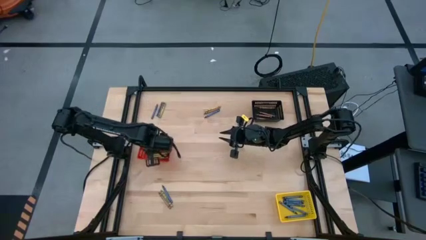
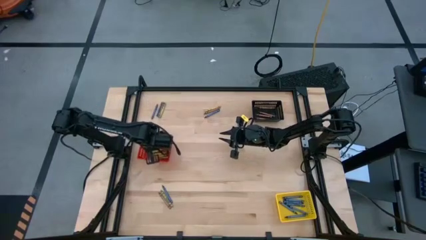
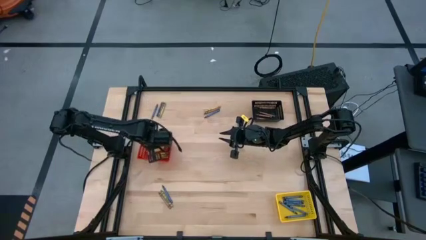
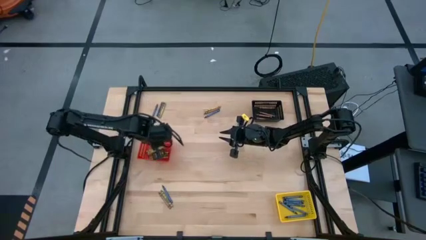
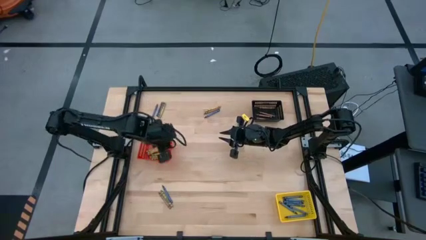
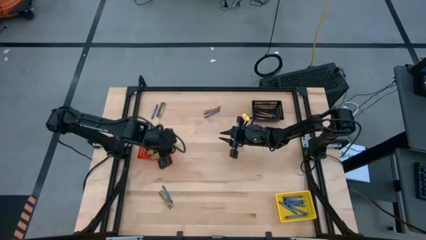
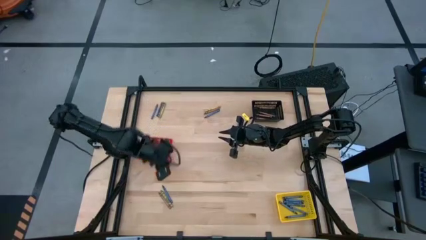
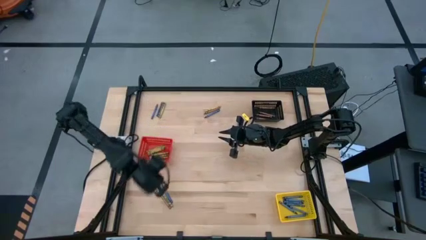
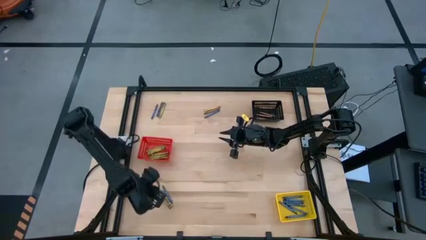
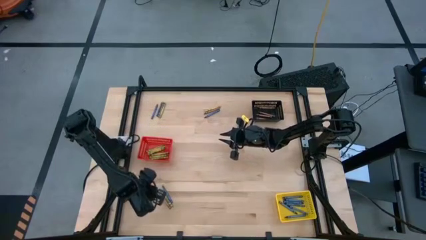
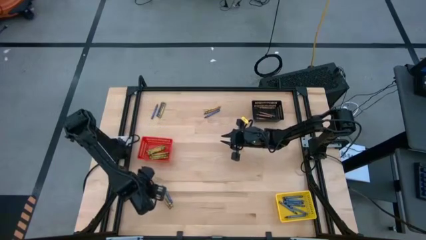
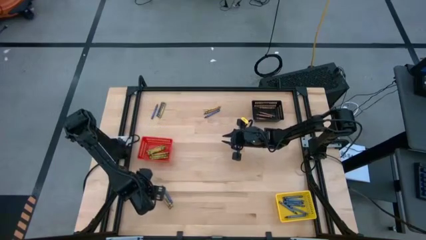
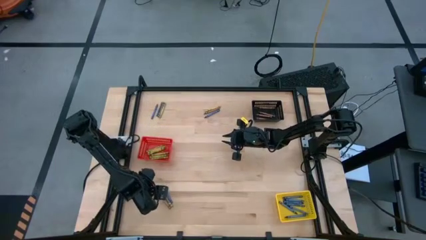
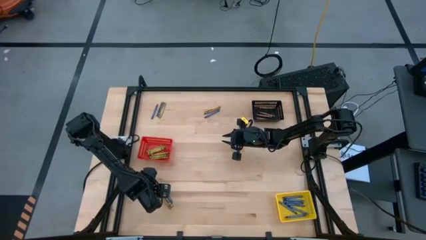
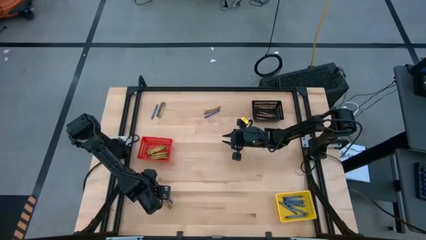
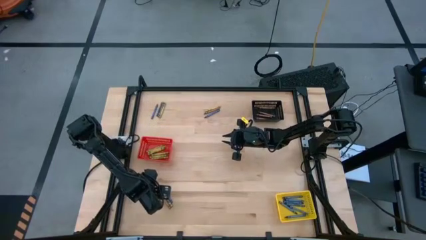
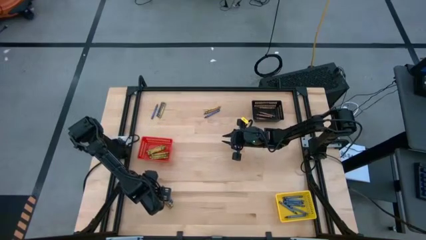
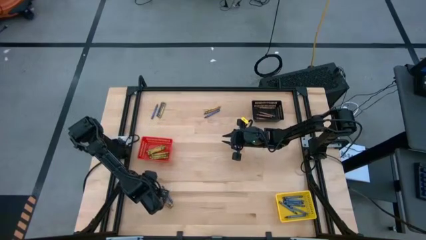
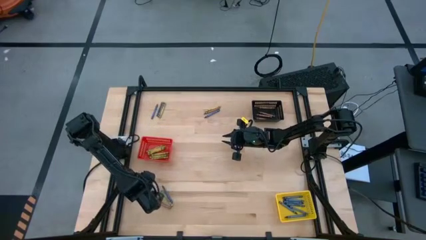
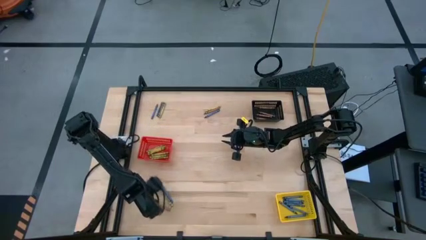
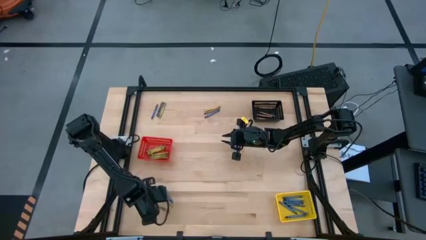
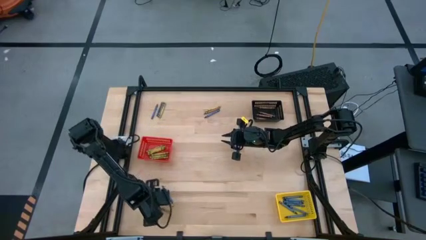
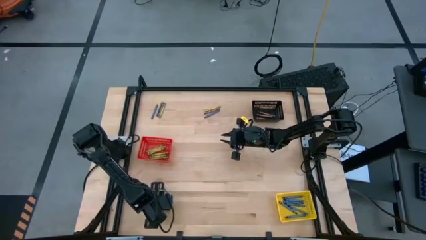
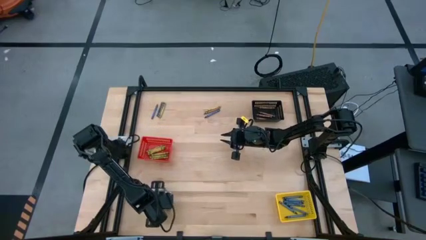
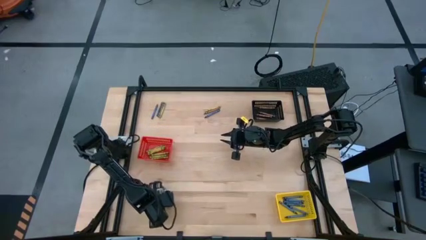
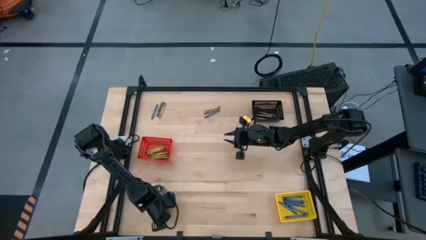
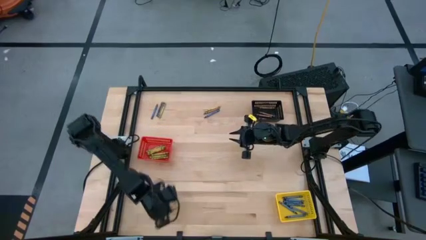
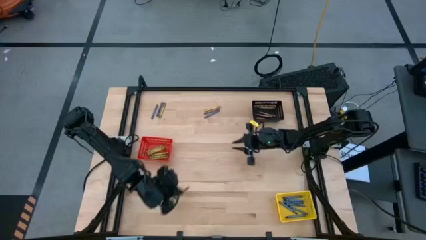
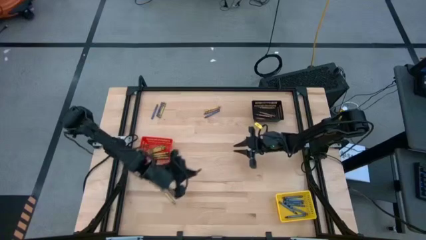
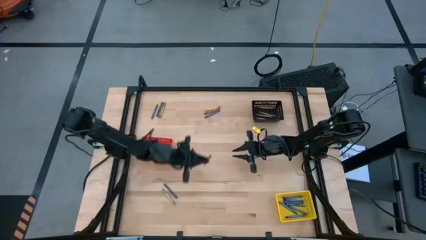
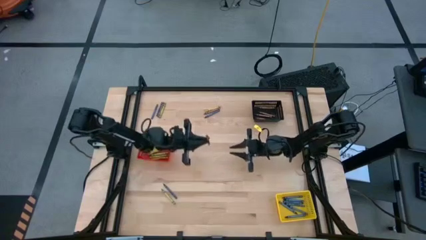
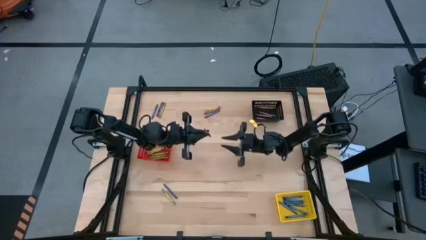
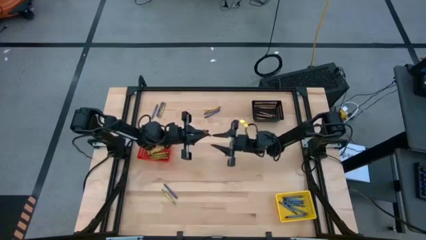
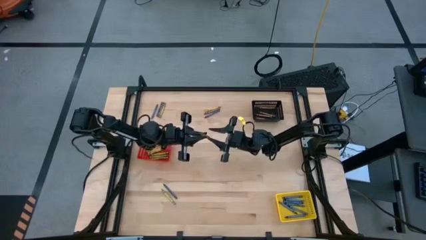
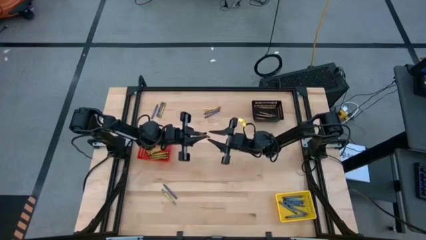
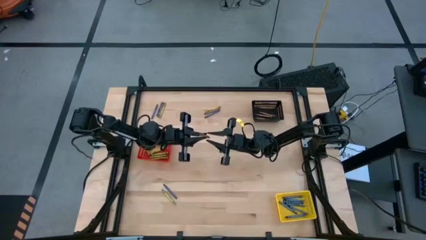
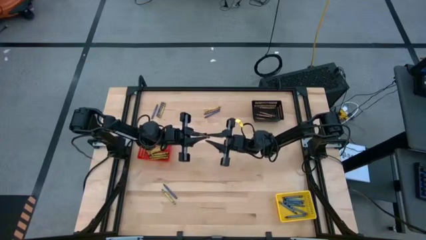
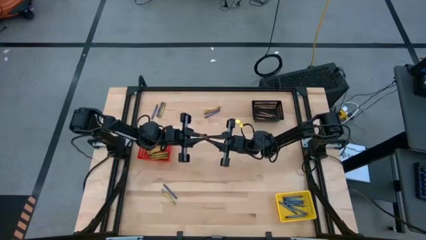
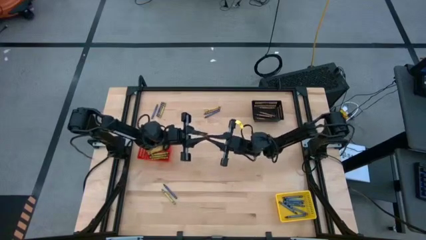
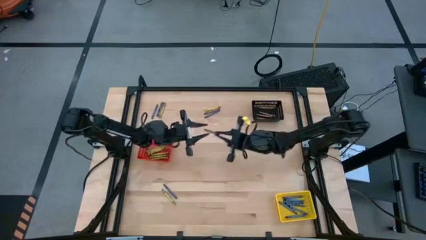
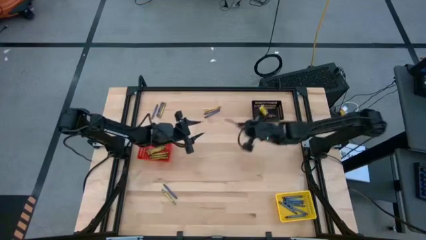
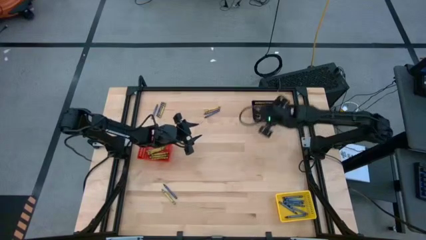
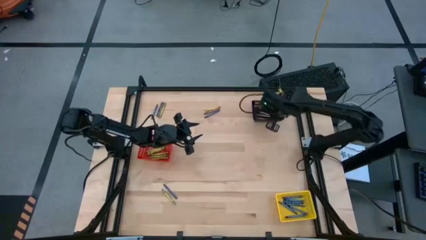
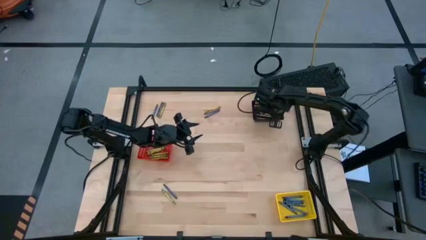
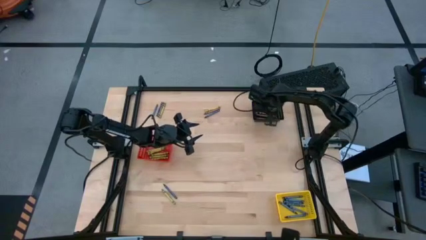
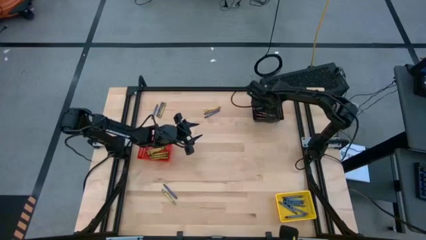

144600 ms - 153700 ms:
Task: Sort crayons
Put the bottom left brown crayon into the black bin

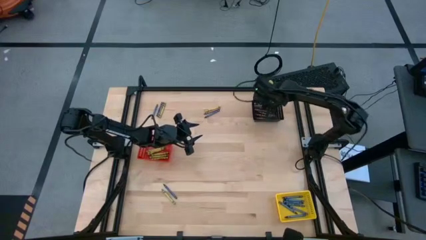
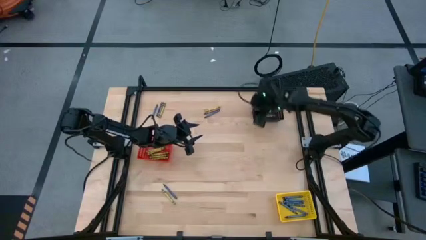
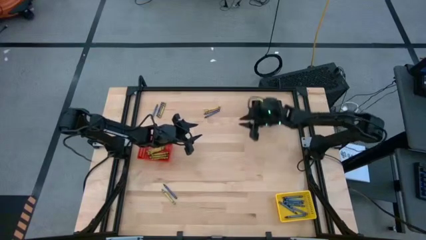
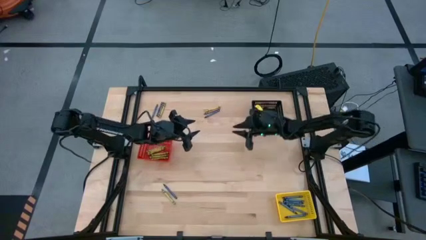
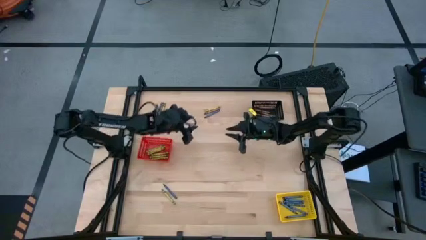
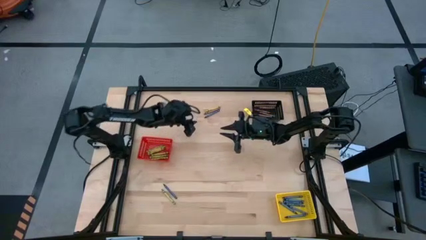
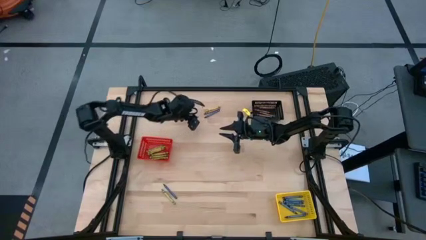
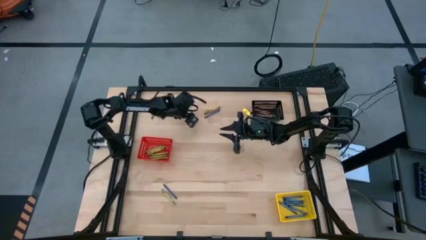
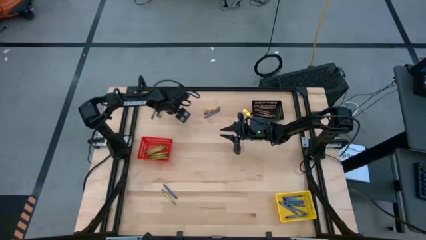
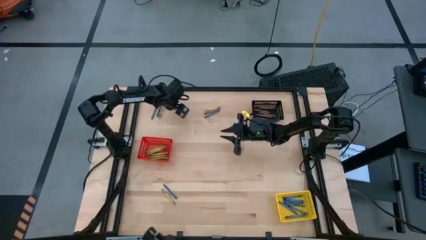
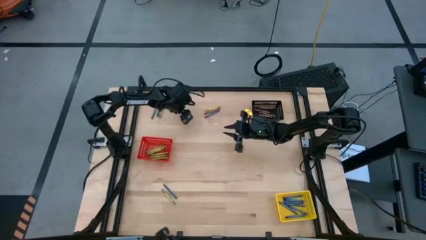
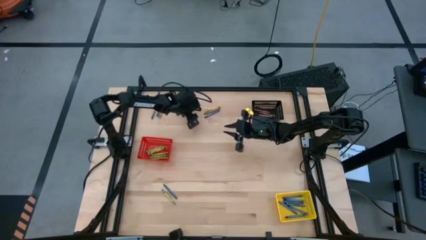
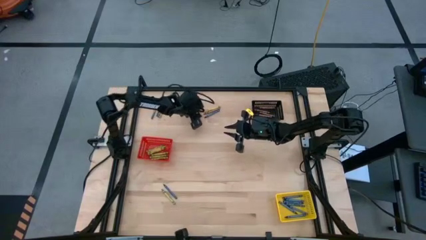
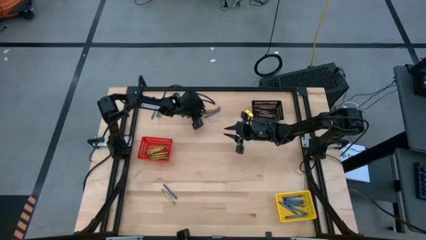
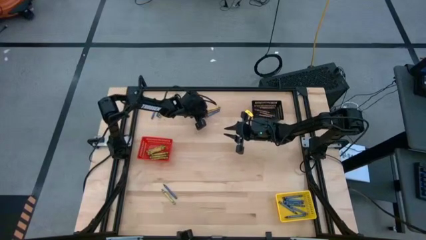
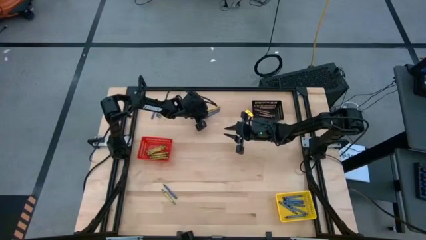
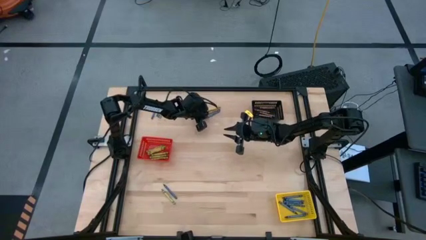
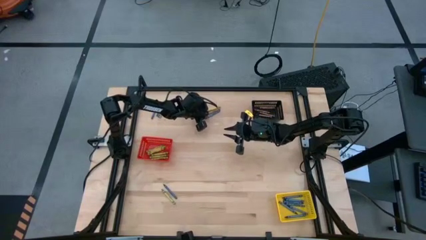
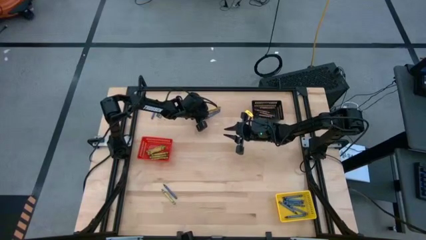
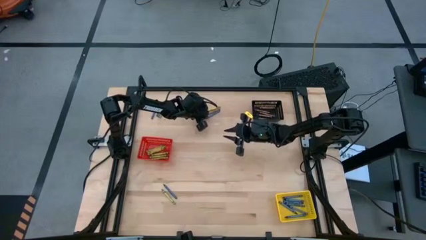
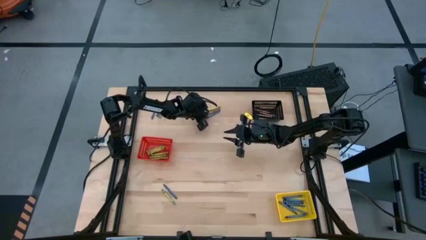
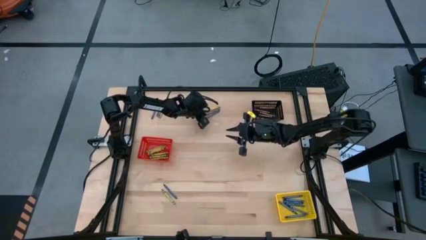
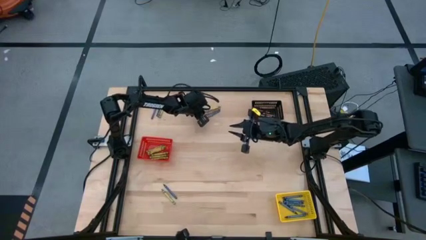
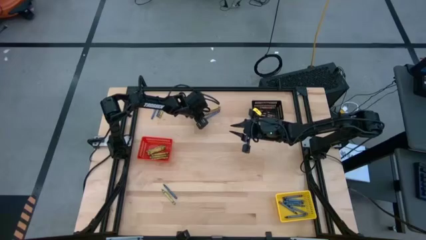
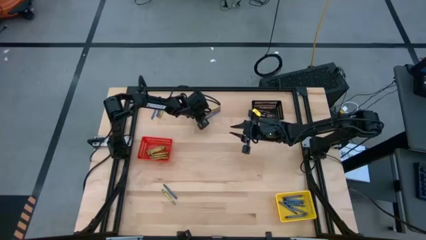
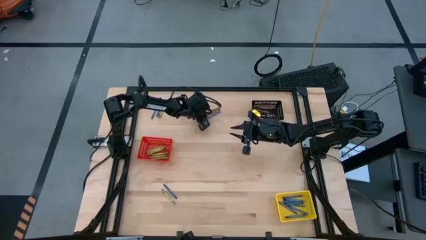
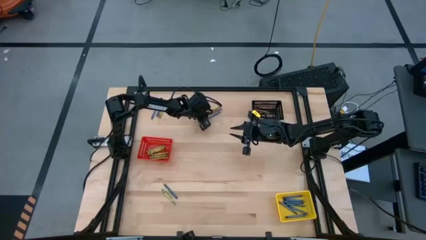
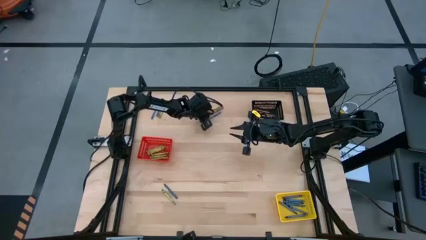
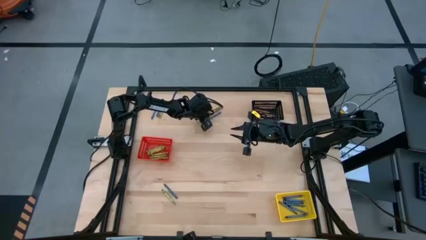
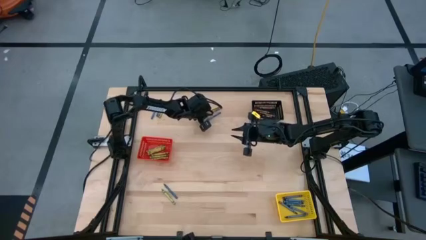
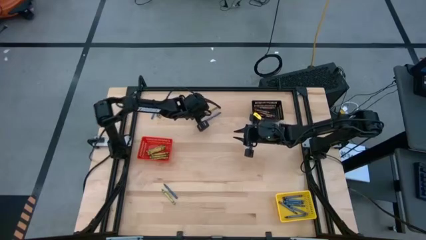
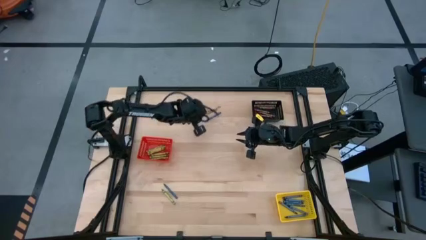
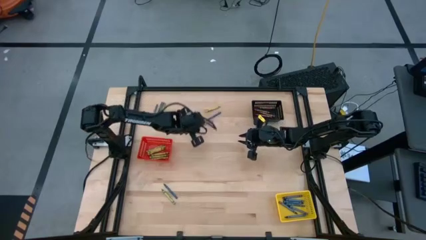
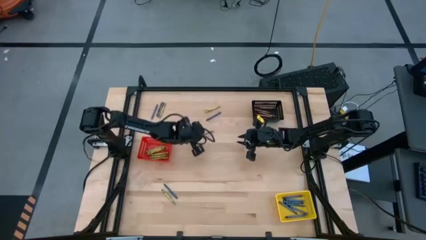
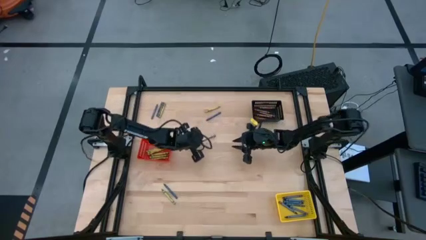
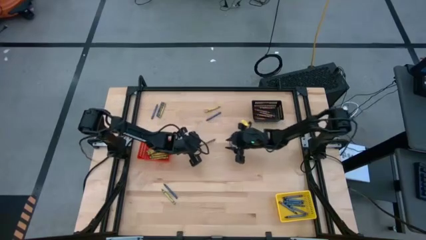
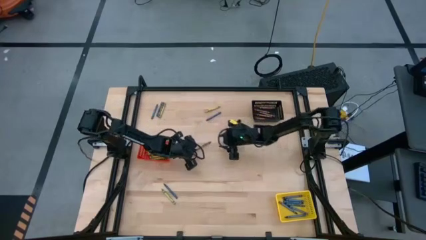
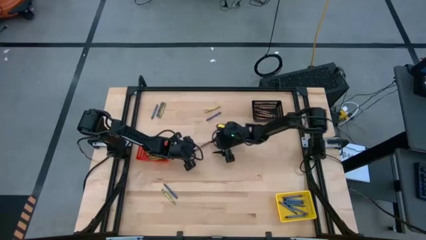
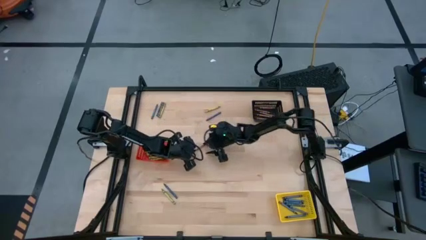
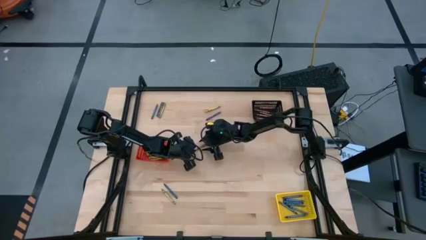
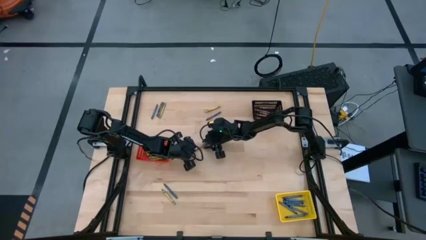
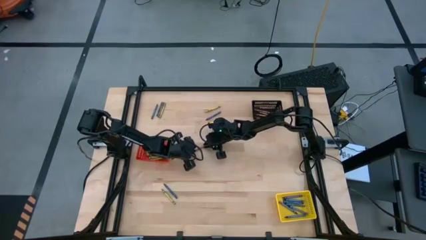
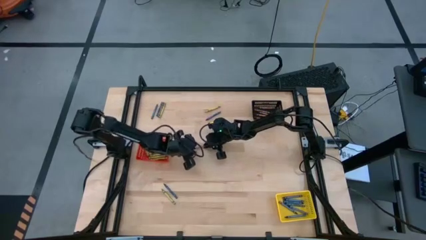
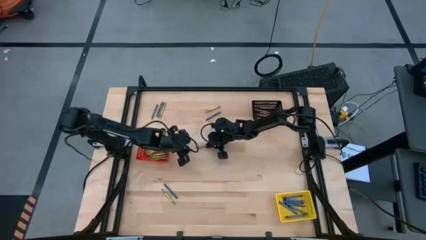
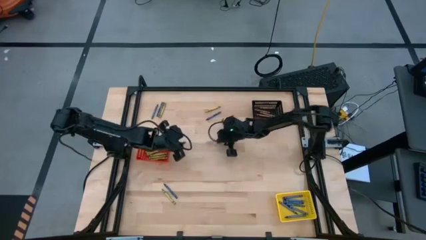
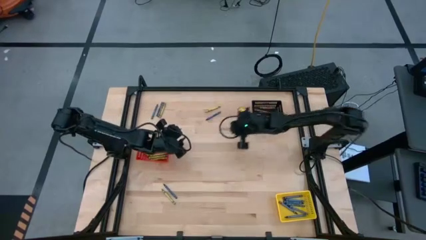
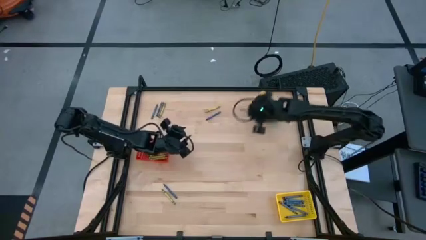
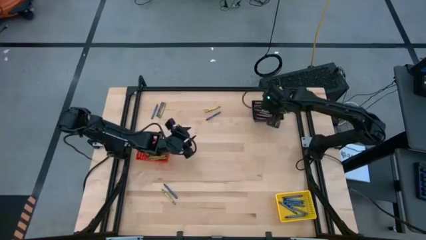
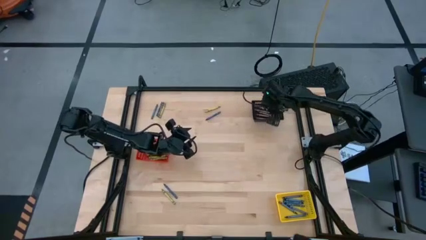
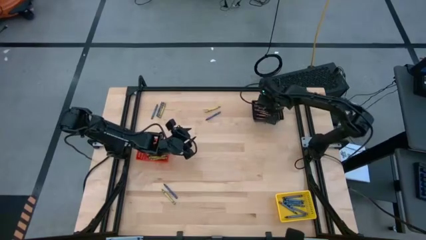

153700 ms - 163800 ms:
Put the right brown crayon into the black bin
